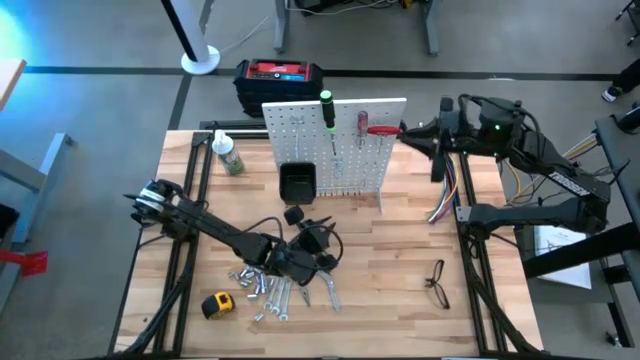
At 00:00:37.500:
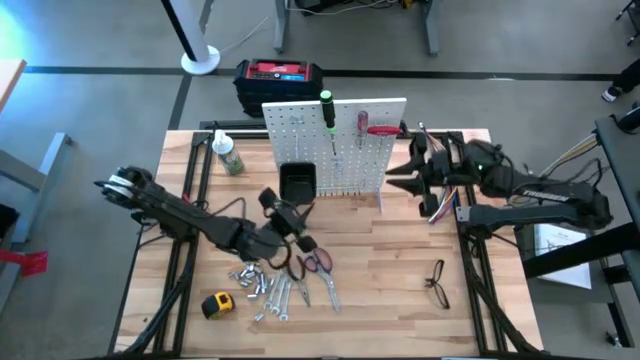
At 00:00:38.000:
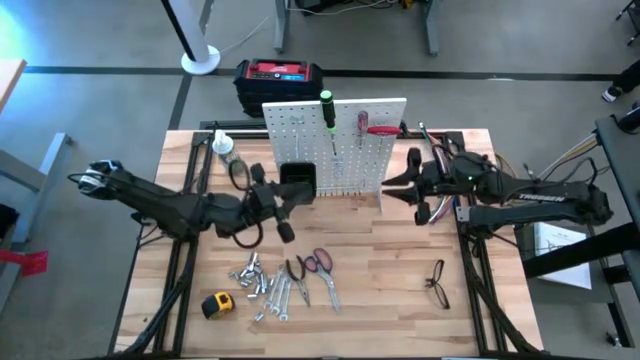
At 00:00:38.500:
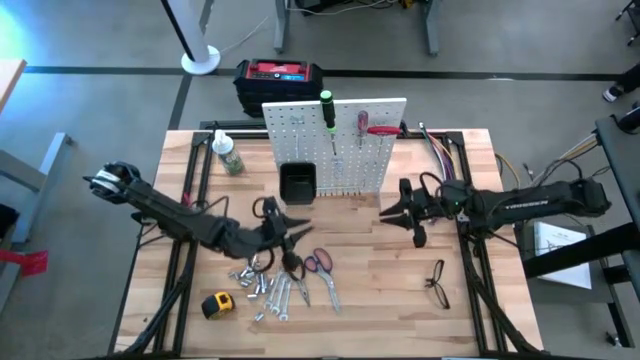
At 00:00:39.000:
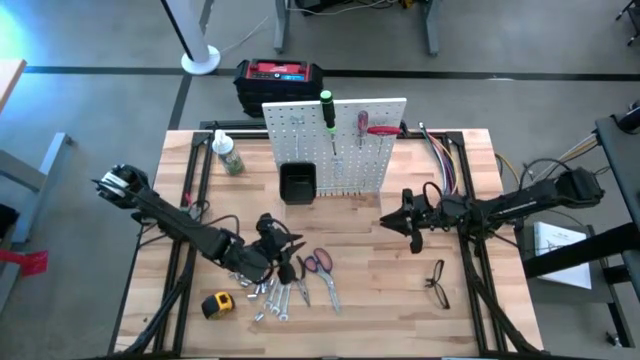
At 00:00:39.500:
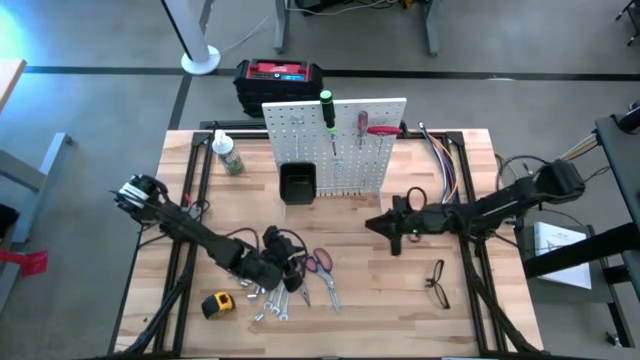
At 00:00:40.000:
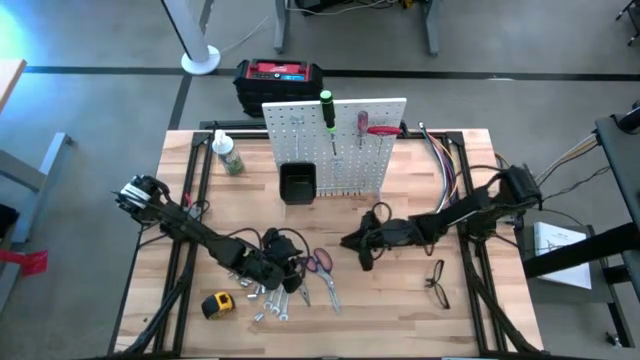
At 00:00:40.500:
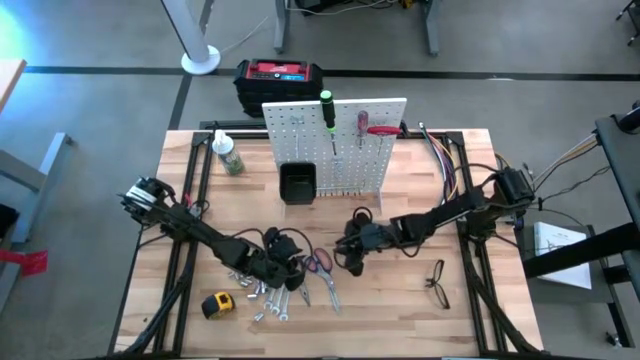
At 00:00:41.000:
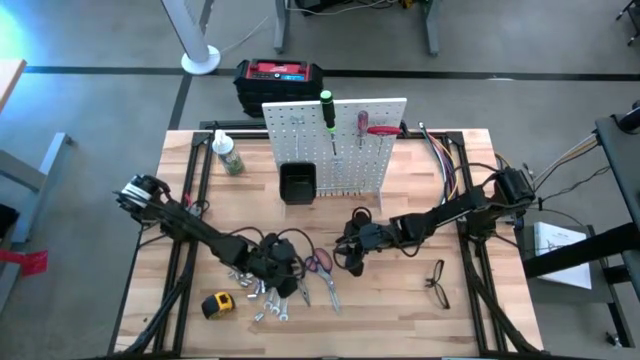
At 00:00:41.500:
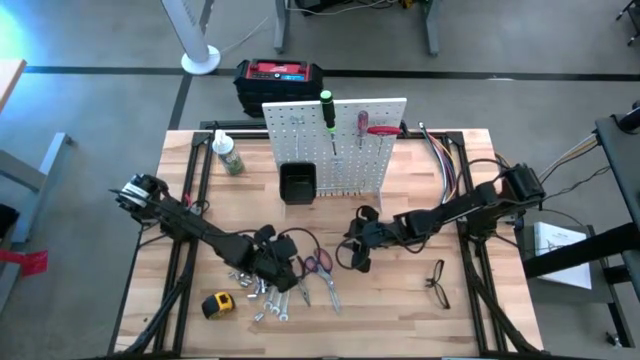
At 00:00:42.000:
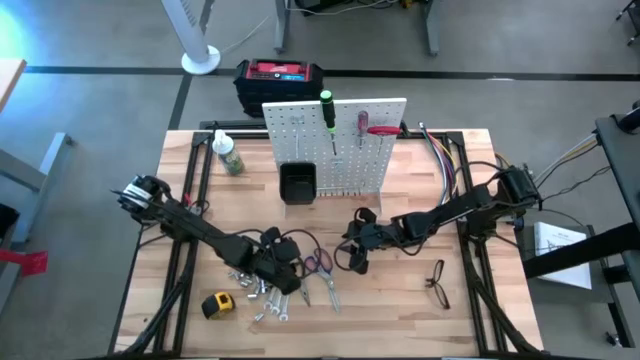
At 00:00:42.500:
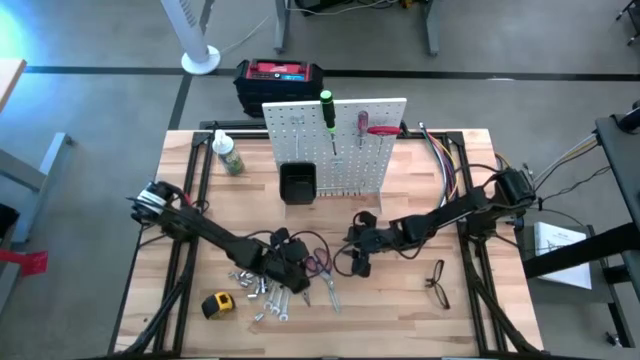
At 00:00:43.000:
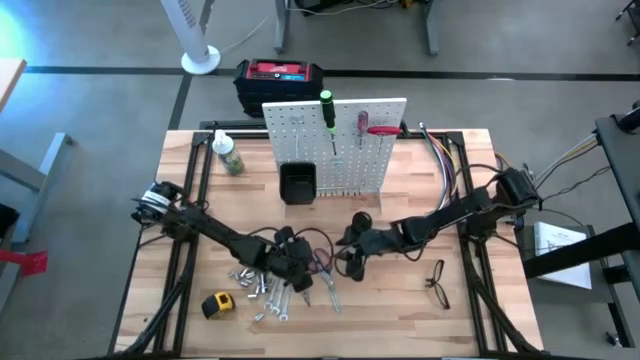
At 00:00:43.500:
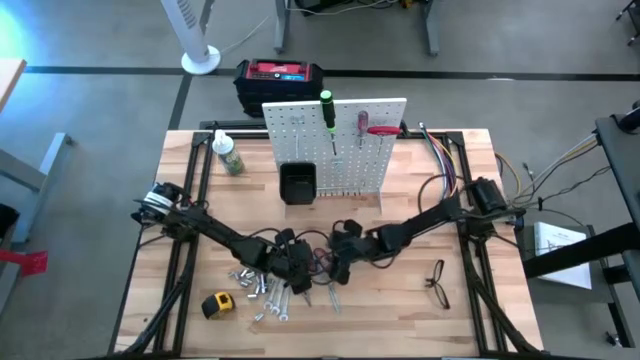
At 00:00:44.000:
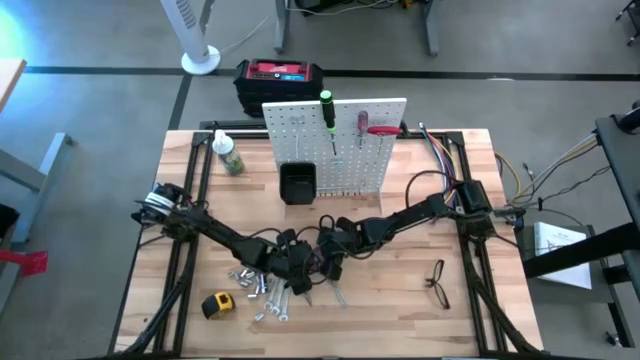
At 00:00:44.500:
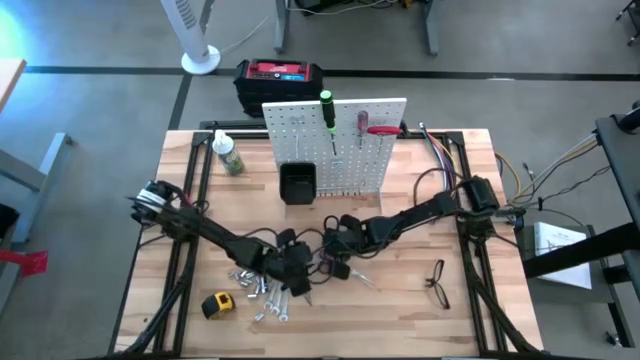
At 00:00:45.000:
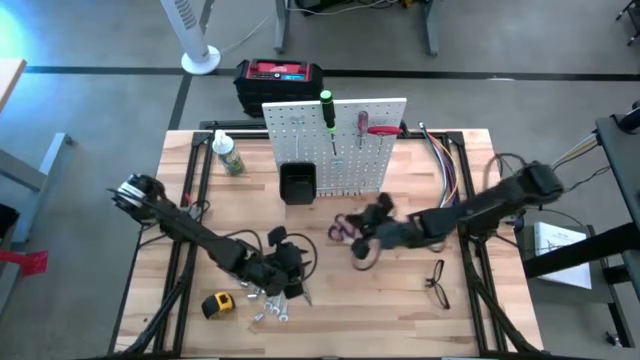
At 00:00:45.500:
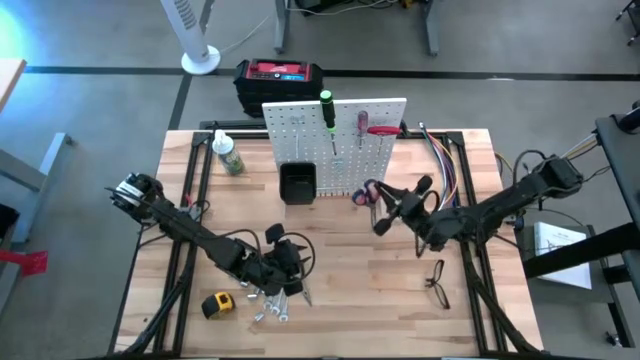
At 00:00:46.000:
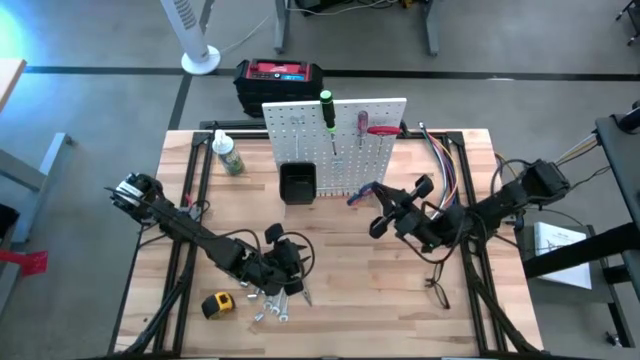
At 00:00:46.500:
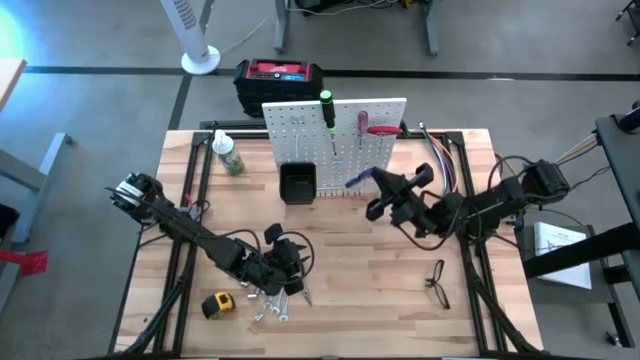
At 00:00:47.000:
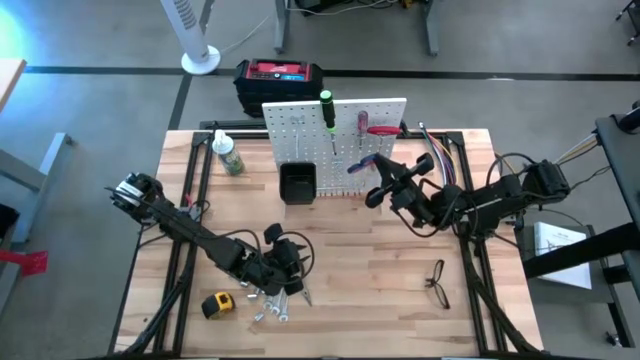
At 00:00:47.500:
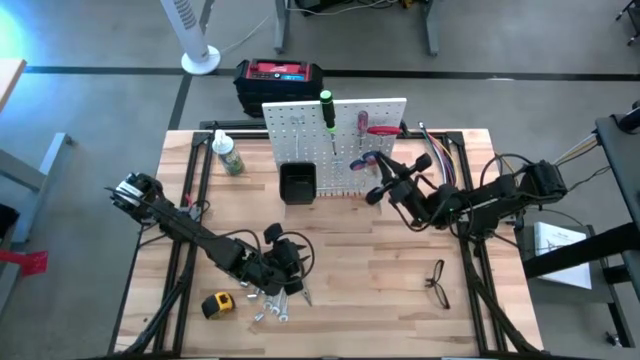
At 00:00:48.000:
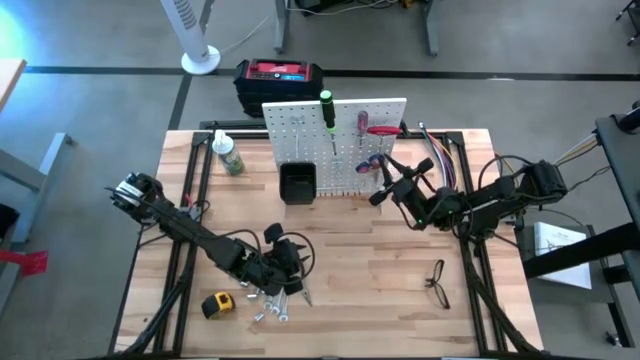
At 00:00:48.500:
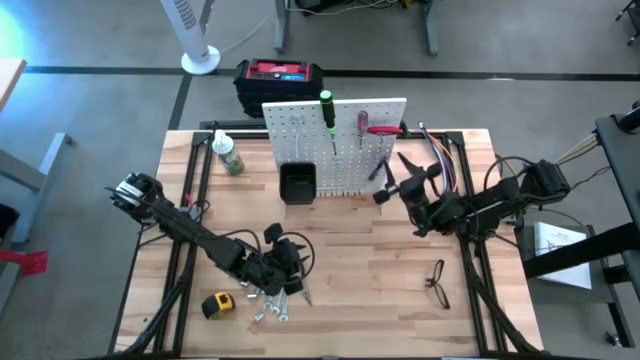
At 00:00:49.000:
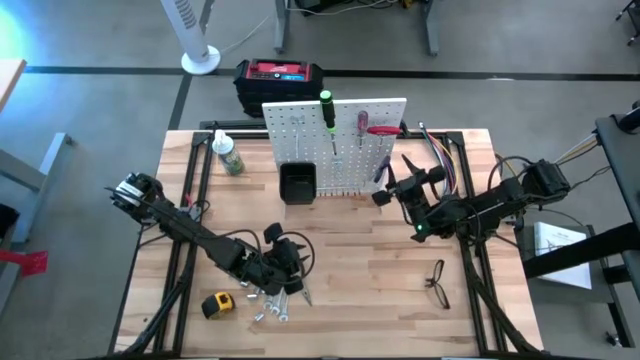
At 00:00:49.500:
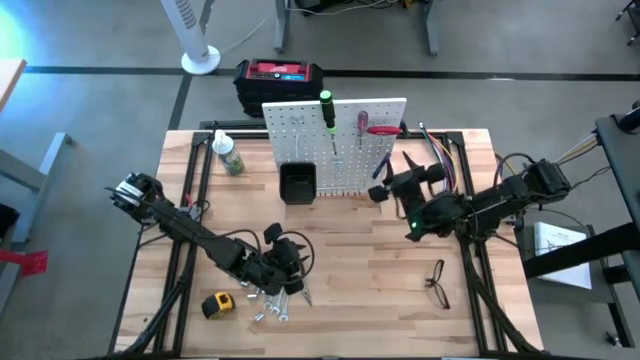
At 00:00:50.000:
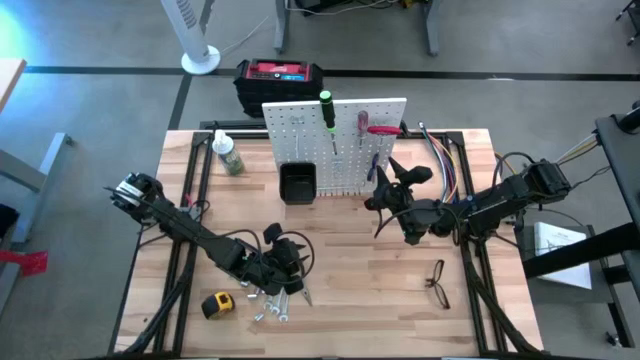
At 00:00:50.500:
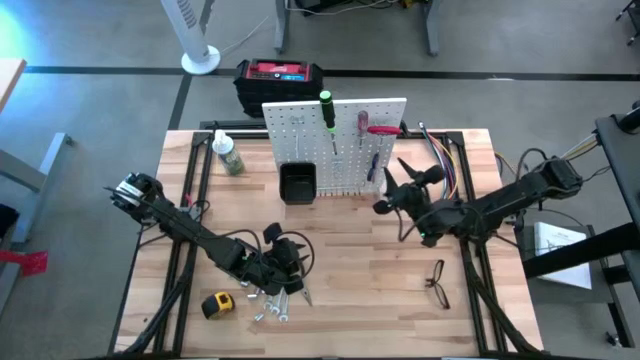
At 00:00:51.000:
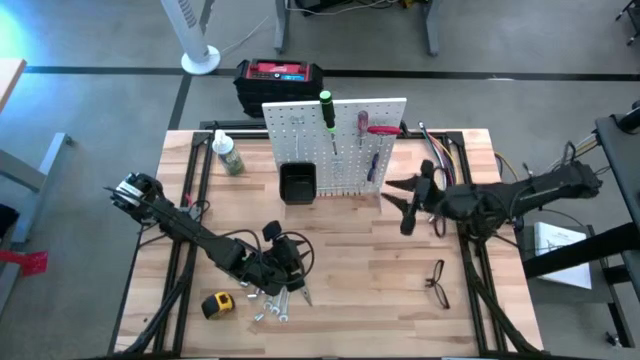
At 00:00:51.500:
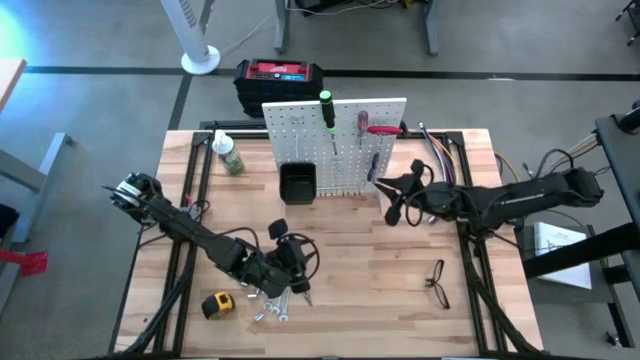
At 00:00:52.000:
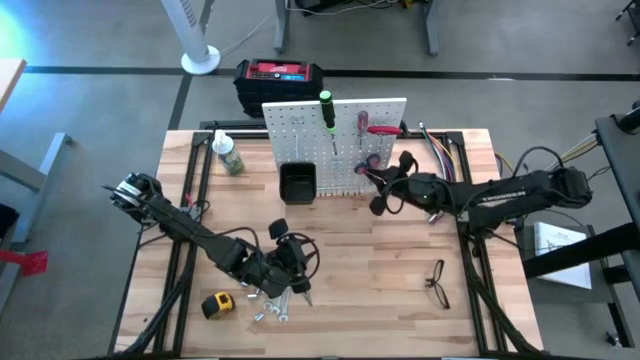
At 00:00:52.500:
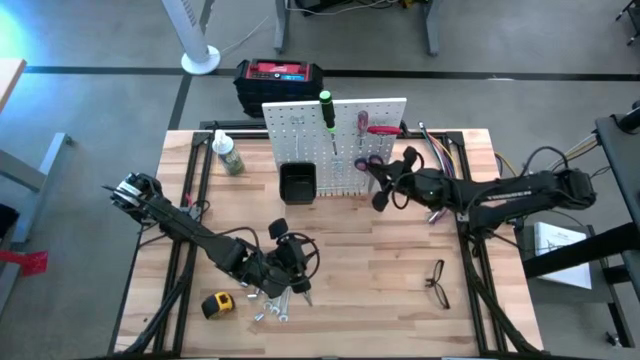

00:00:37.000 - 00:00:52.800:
Task: Hang tools onto peg board
Hang the blue scissors on the pegboard

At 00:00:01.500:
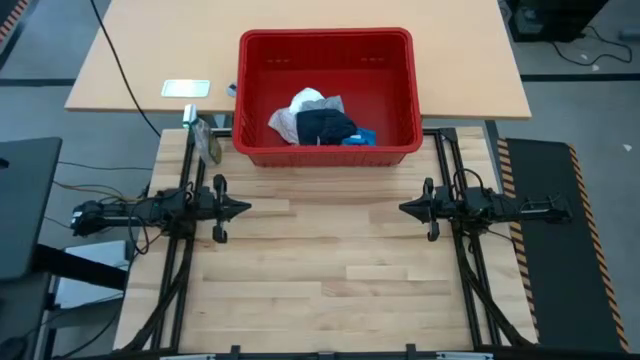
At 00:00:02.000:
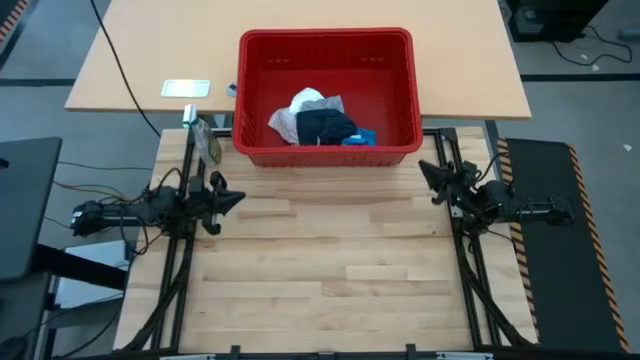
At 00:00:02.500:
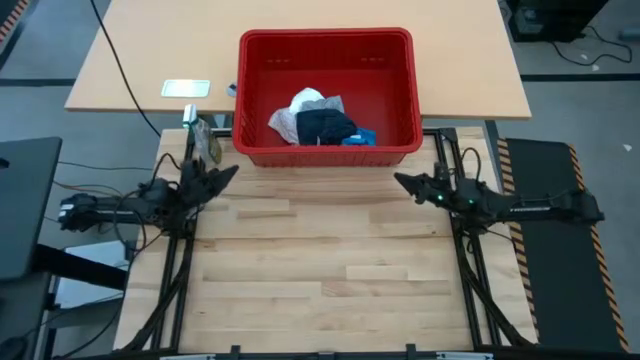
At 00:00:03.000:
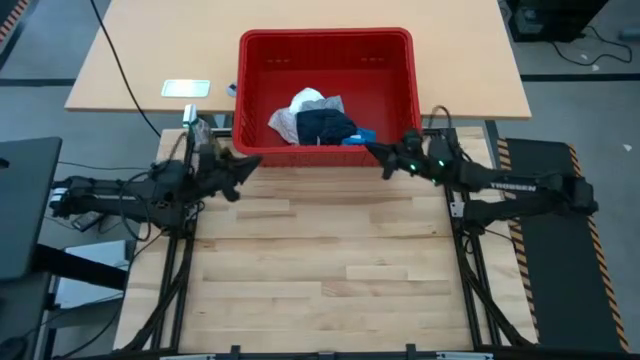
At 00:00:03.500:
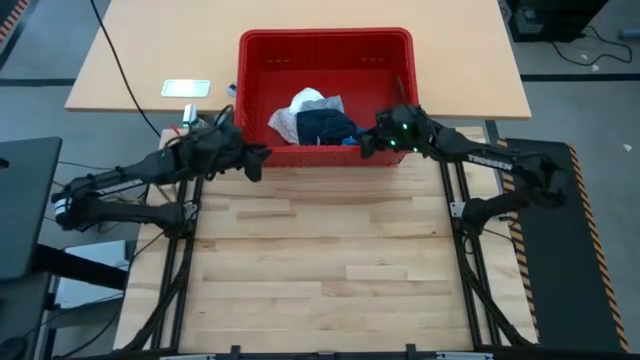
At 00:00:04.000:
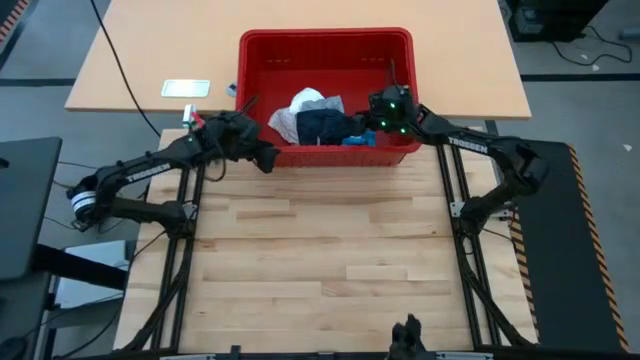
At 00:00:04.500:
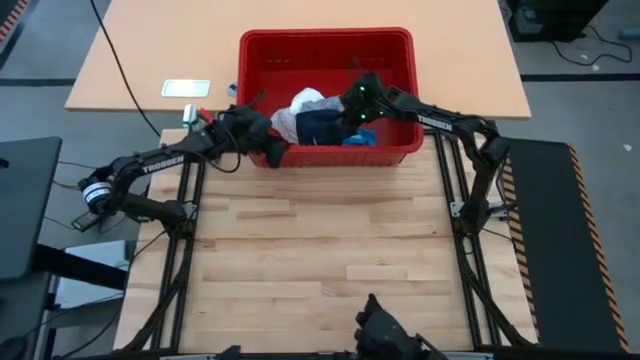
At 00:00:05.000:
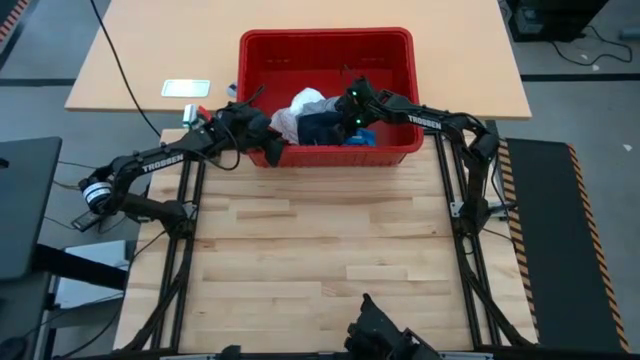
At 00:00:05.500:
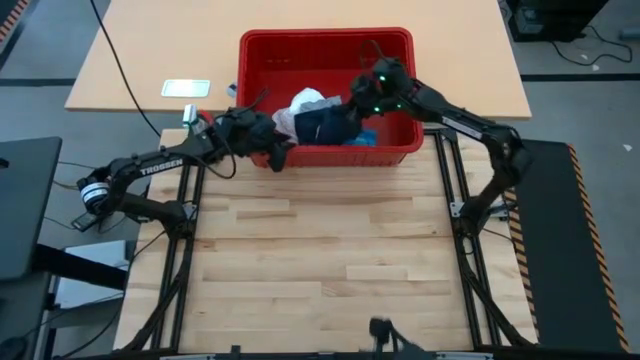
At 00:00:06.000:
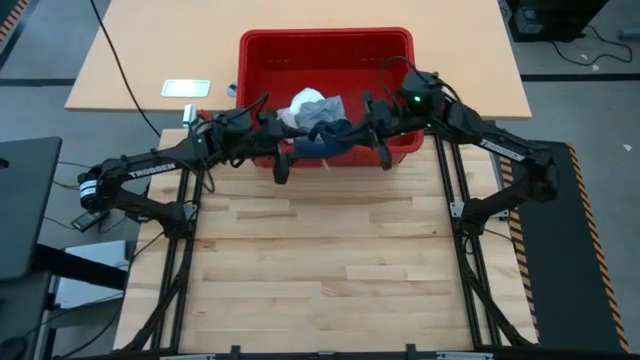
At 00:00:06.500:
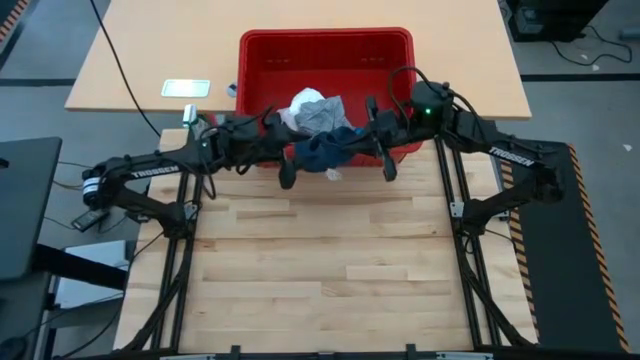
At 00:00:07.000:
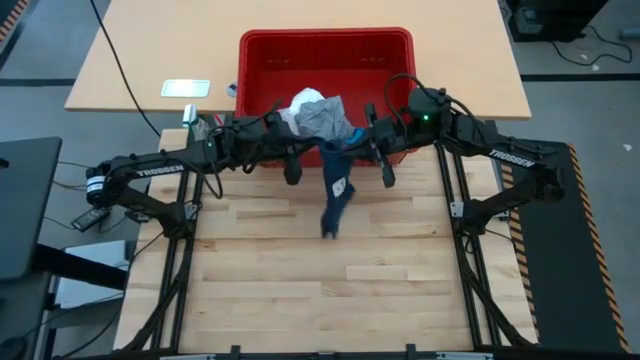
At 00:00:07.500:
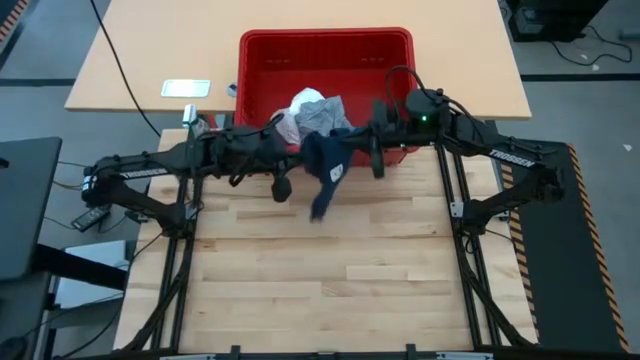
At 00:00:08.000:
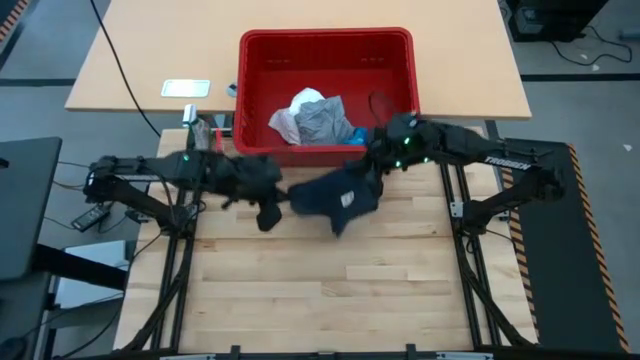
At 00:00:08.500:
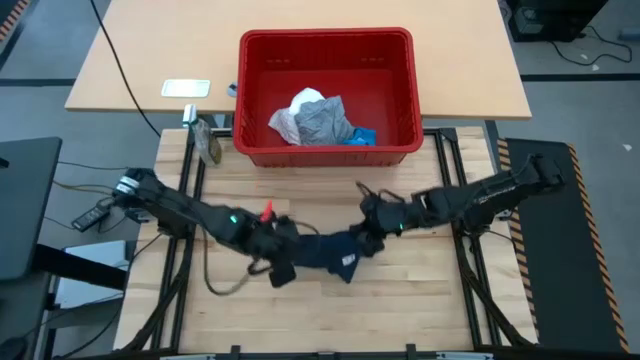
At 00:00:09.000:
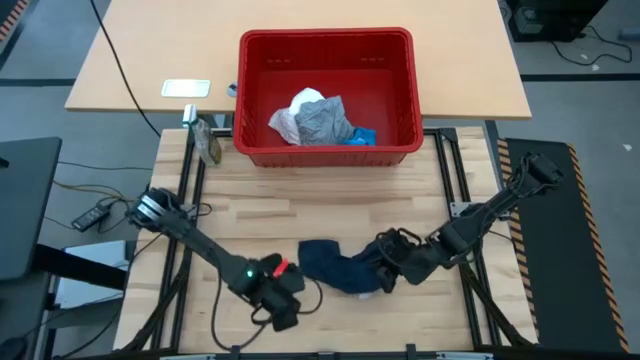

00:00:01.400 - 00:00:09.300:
Task: Fold laundry
Remove the dark blue shorts from the red laundry bin
